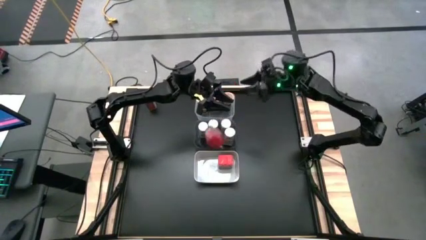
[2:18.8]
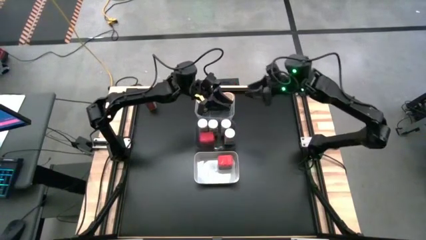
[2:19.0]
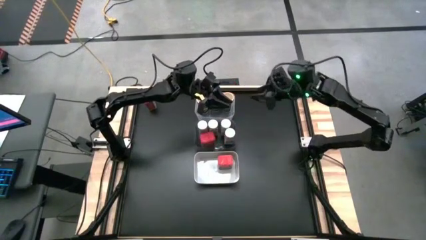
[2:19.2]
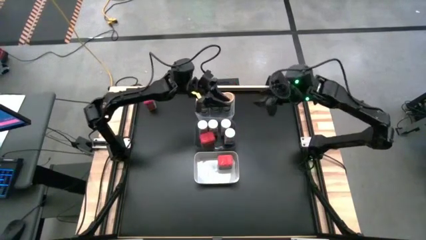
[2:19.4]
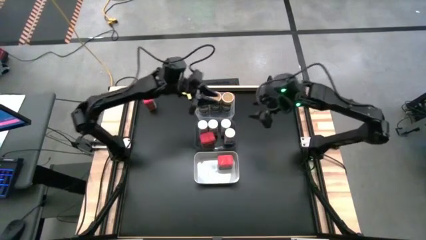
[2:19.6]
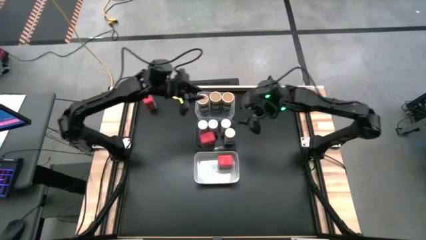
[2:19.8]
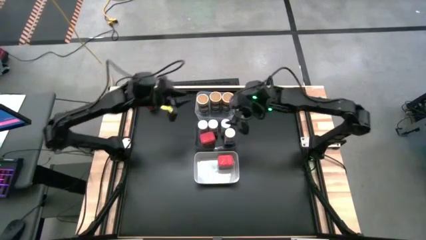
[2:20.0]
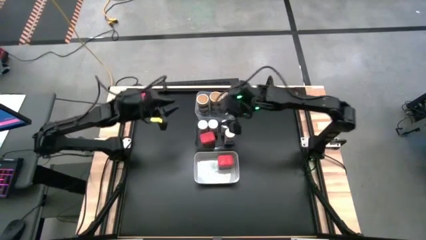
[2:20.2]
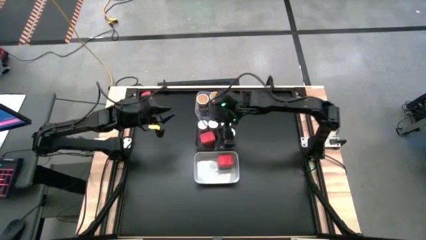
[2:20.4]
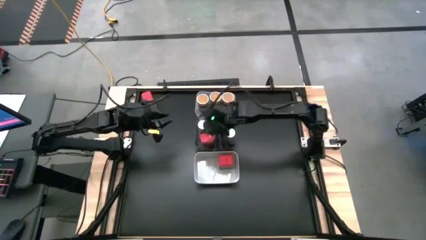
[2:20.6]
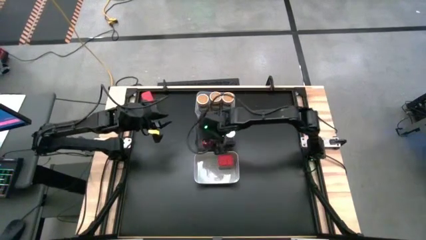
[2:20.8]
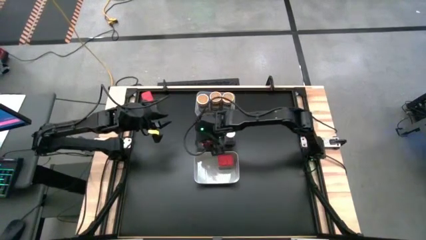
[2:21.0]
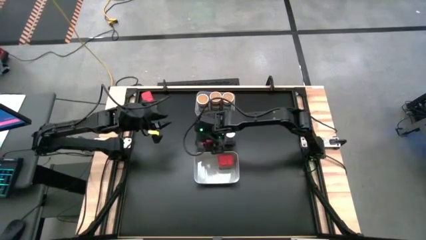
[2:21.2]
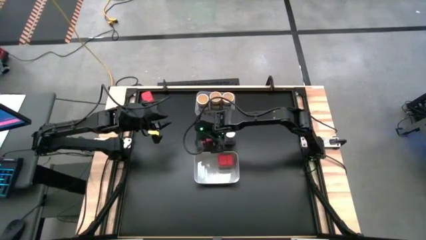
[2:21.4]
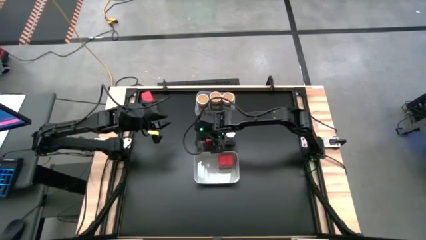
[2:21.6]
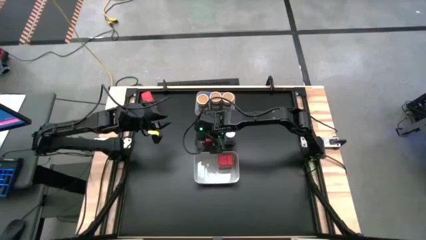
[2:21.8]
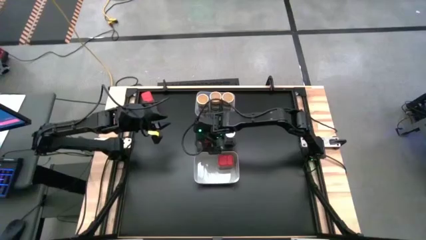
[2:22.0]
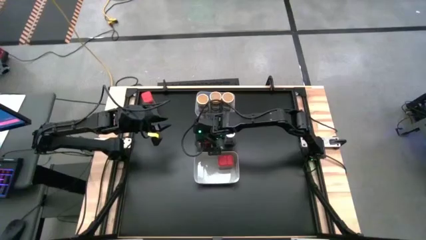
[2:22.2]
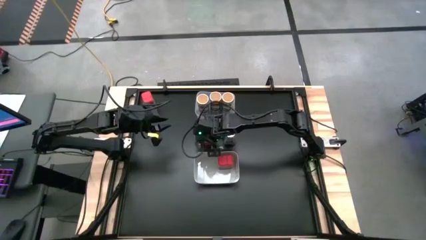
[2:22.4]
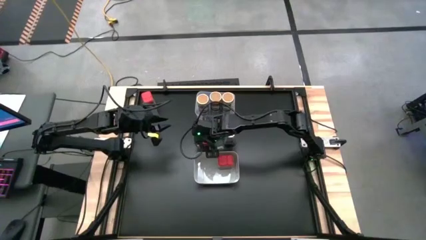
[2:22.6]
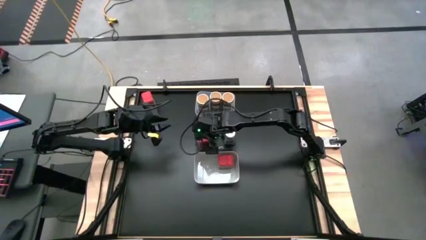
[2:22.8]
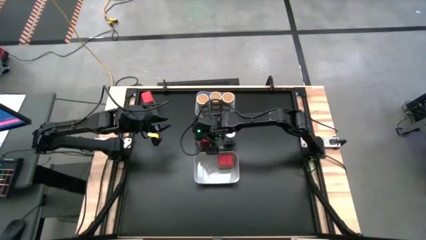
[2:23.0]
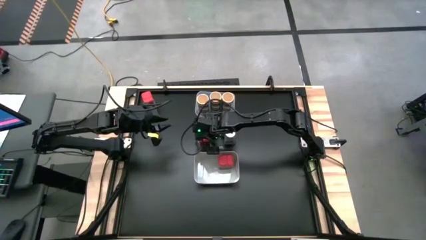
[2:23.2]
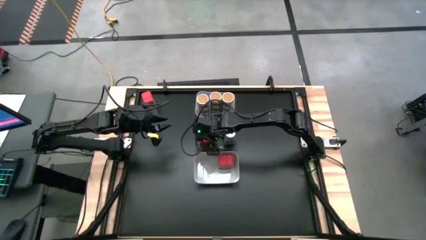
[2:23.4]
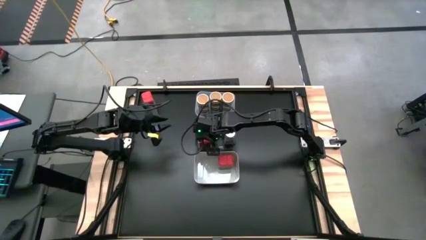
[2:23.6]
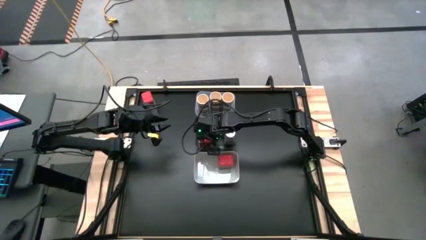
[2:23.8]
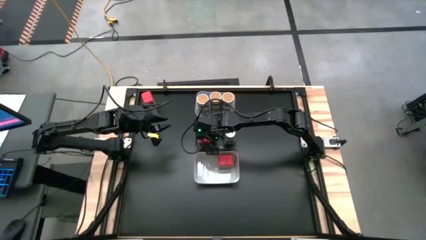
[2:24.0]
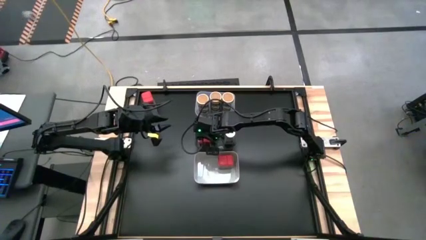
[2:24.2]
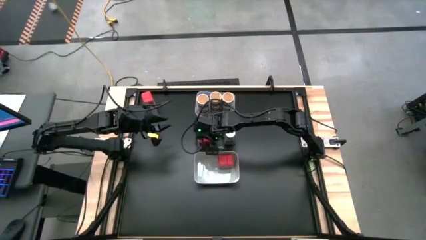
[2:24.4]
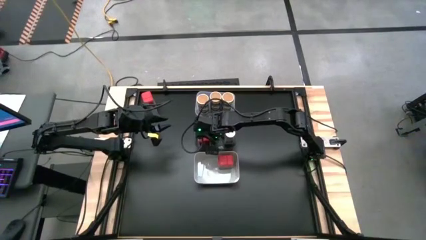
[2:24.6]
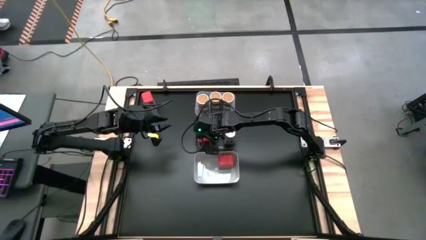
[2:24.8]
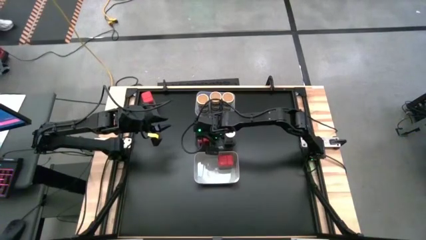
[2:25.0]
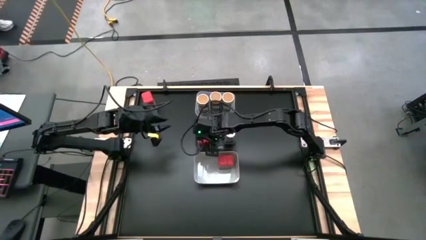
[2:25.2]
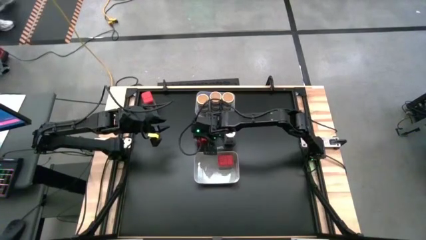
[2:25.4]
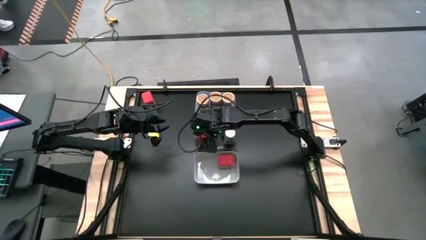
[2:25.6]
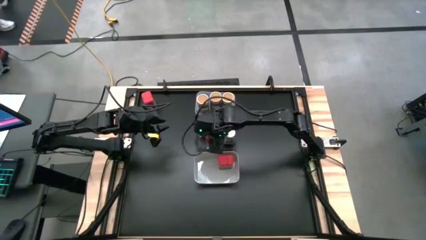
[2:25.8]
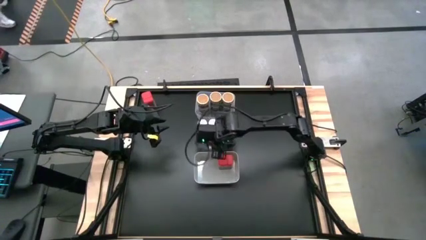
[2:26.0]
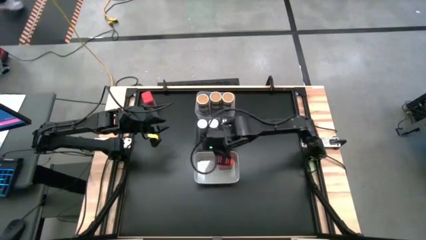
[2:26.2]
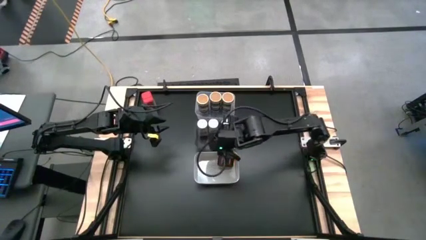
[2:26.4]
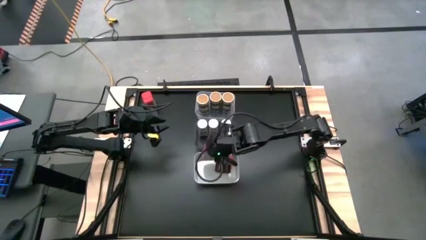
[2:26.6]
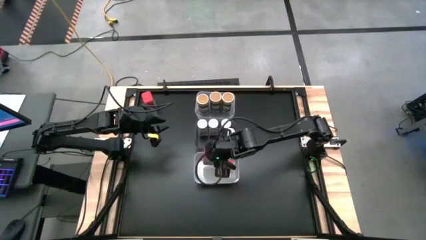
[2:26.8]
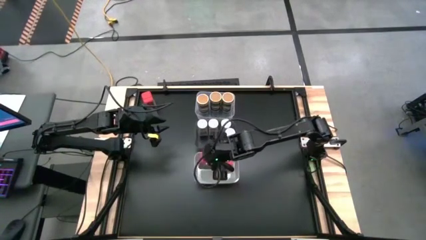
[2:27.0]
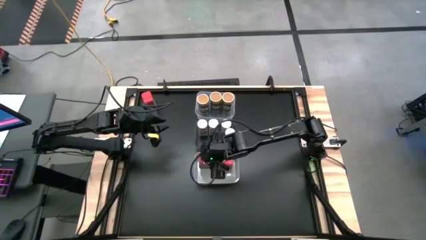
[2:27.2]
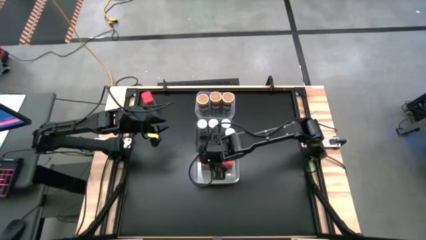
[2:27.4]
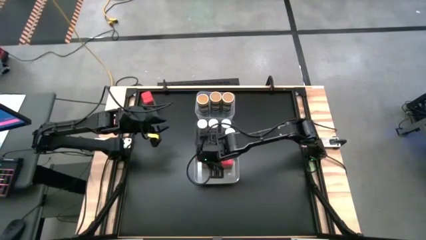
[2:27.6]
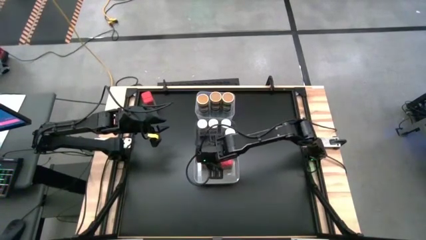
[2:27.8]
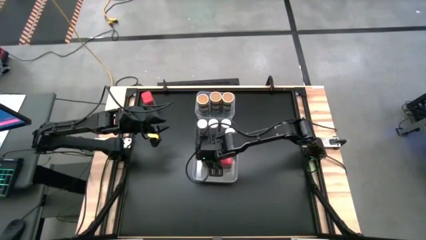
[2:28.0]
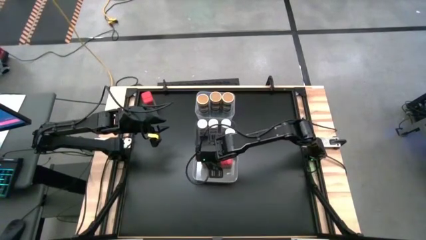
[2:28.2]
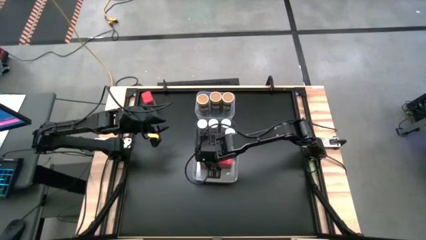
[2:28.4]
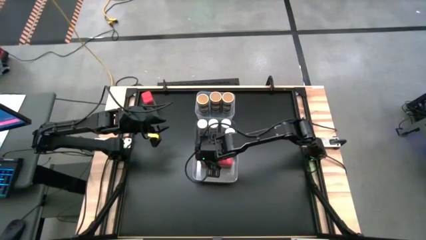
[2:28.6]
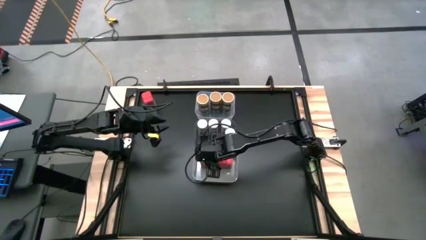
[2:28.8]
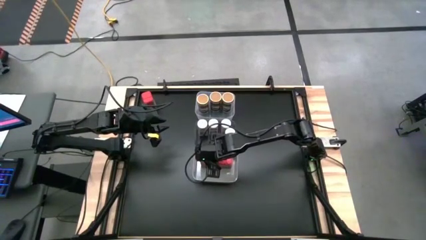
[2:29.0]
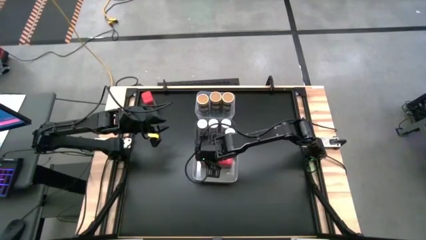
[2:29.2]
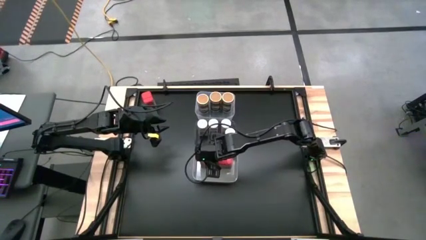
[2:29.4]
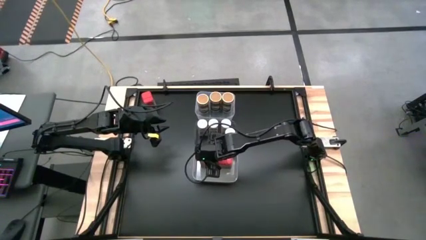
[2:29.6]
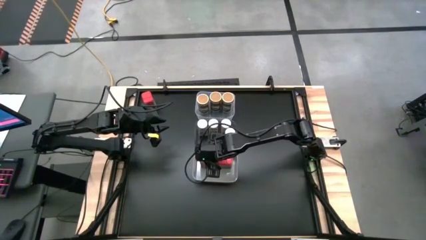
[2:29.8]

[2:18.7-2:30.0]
Task: Sort spices by type
Move the right red seasoning can in the black transparent bin to the white bin aligned with the other red seasoning can
